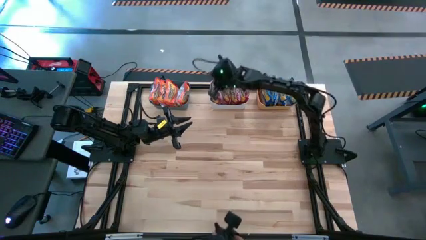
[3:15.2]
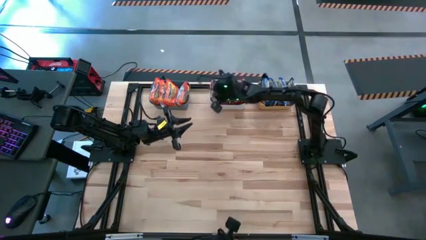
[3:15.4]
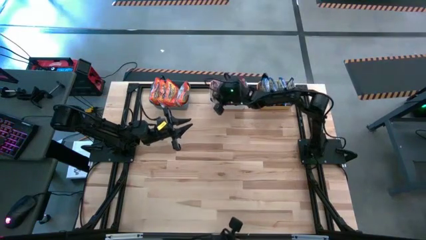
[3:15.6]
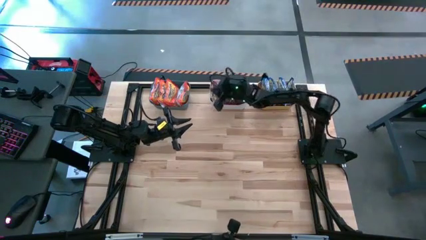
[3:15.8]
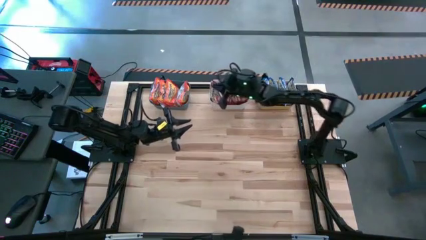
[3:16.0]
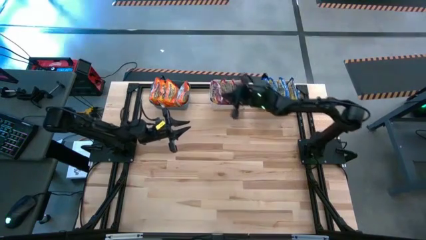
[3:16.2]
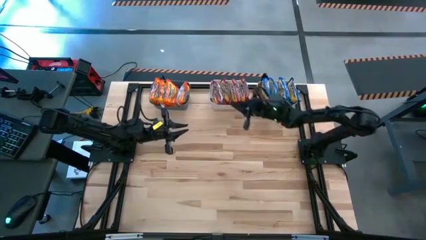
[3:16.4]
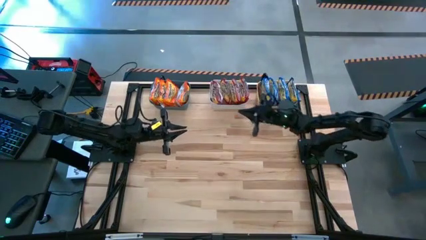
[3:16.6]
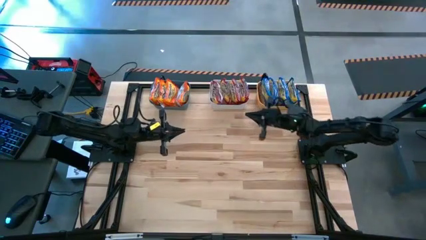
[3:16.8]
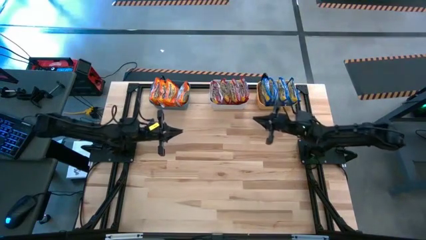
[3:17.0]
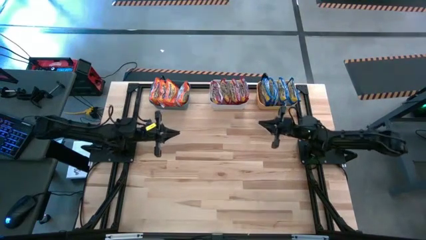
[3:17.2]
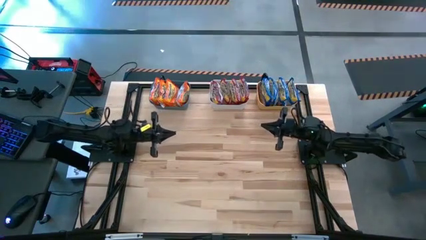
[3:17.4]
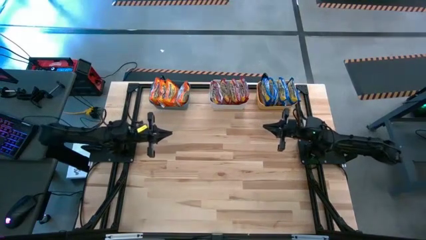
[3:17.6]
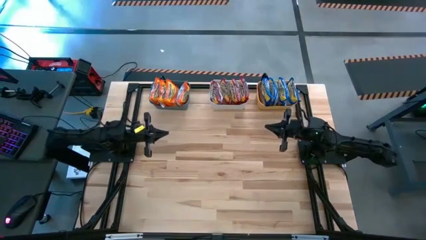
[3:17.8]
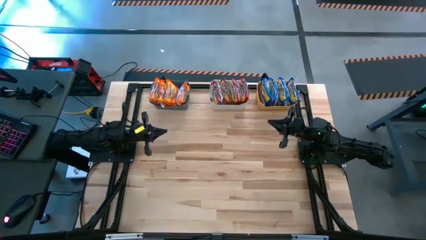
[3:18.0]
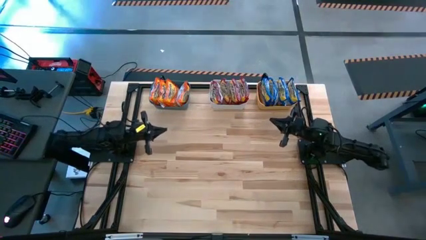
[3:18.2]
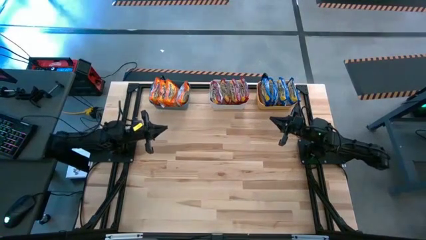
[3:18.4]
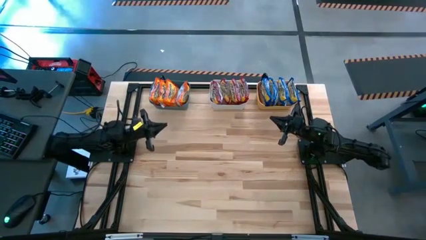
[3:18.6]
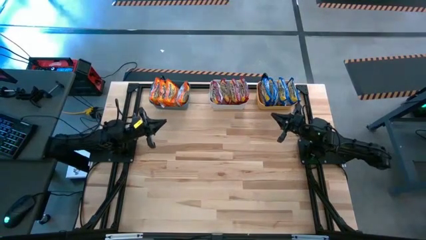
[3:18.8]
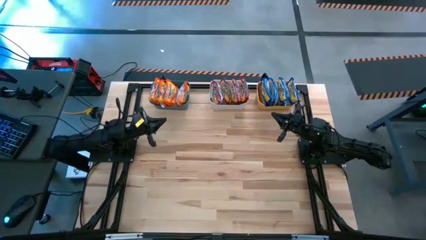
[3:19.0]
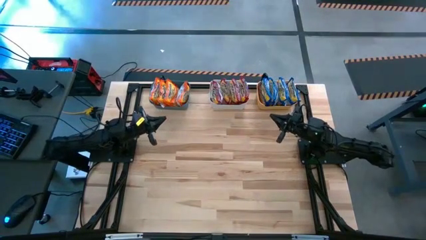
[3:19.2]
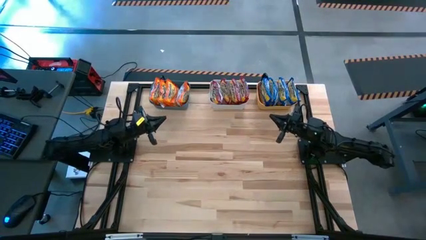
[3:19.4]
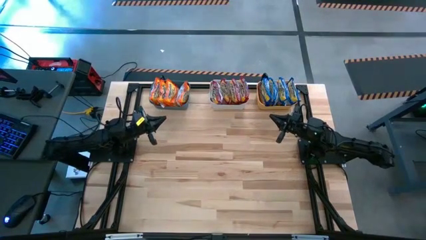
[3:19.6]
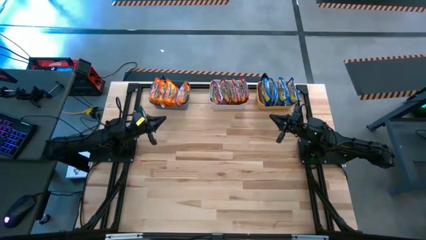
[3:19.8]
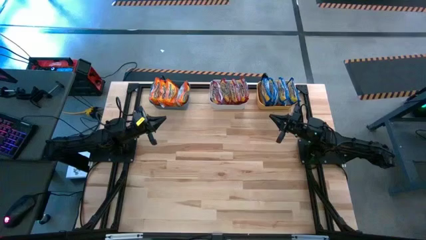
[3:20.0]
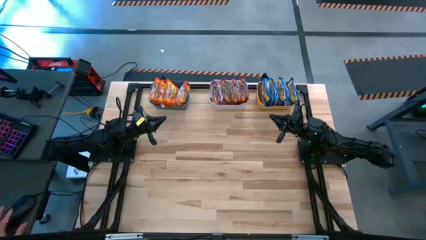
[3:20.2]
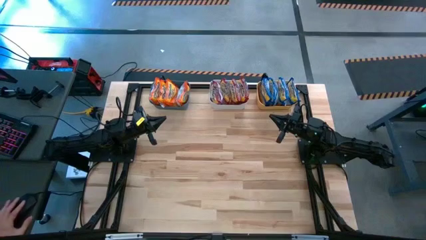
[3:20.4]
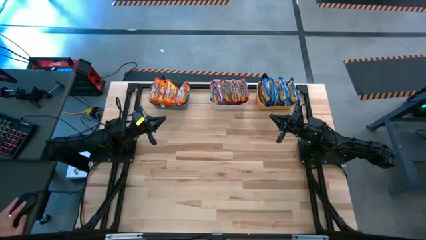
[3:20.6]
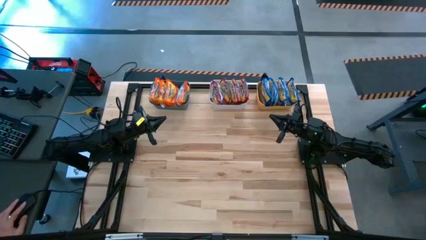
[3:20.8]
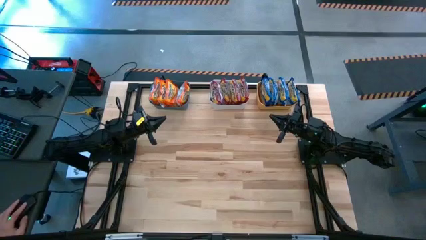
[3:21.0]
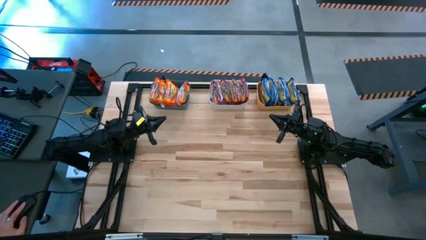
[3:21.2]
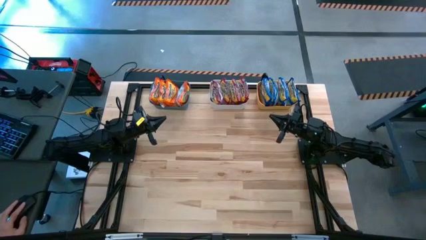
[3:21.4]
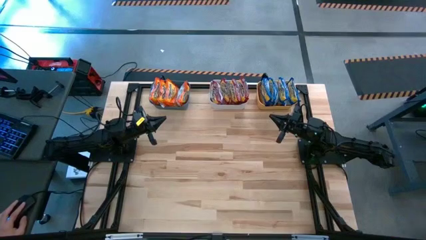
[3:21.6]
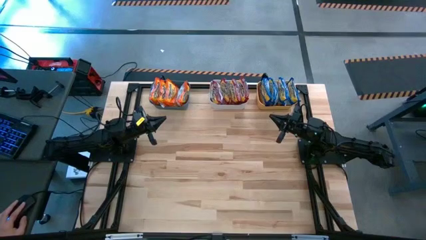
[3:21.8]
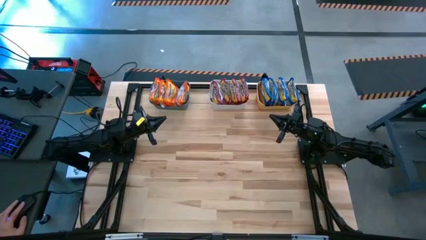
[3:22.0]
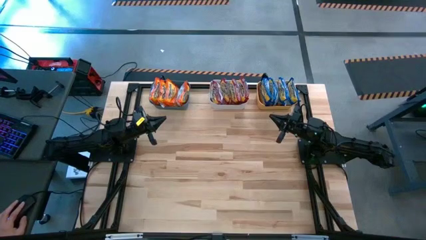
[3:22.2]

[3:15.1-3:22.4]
Task: Sort Maruchan noodles
Return to Home Position

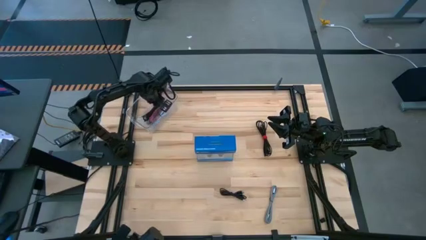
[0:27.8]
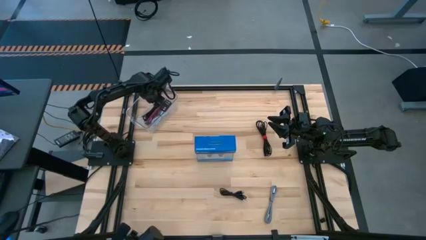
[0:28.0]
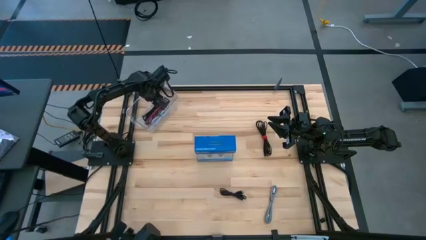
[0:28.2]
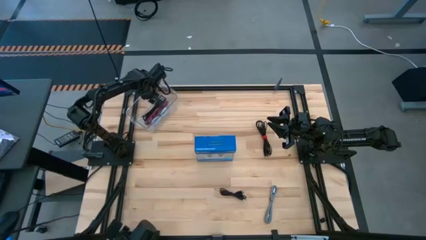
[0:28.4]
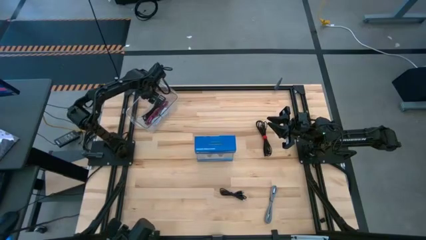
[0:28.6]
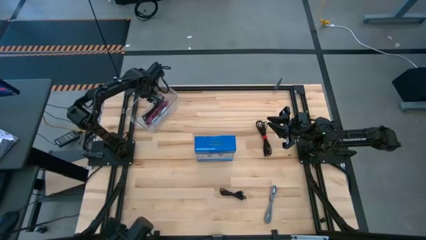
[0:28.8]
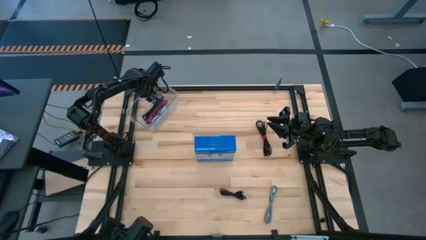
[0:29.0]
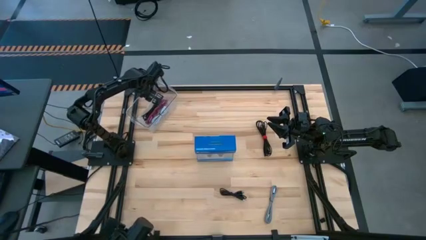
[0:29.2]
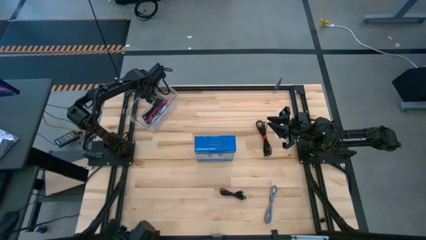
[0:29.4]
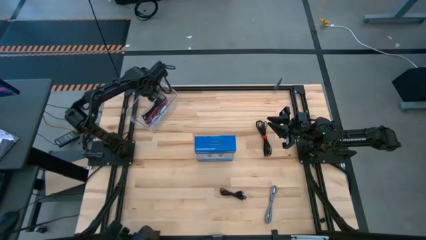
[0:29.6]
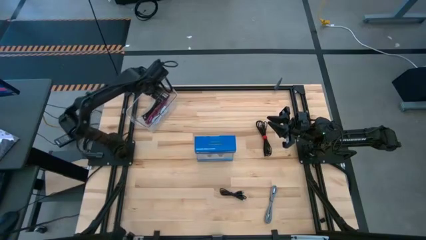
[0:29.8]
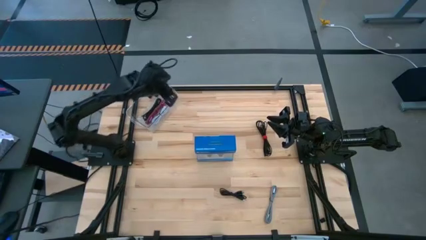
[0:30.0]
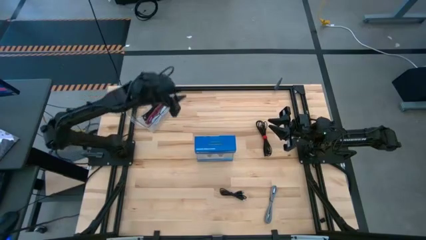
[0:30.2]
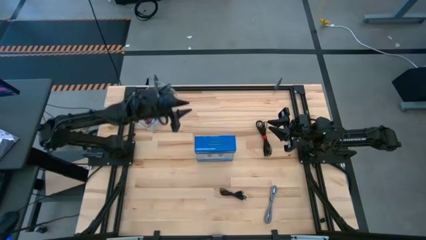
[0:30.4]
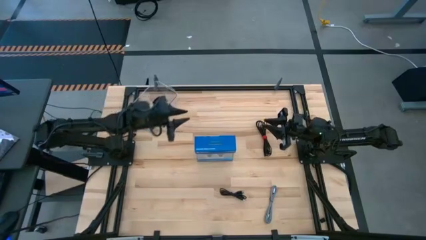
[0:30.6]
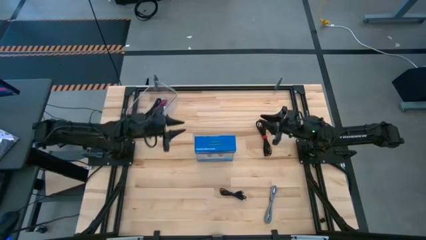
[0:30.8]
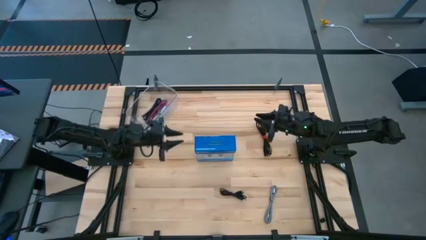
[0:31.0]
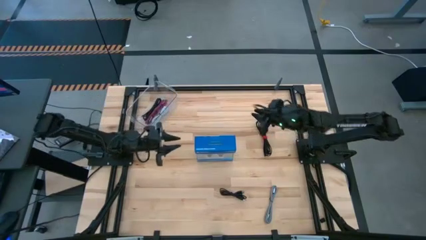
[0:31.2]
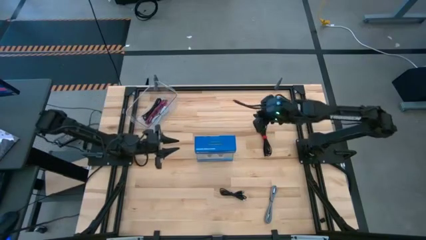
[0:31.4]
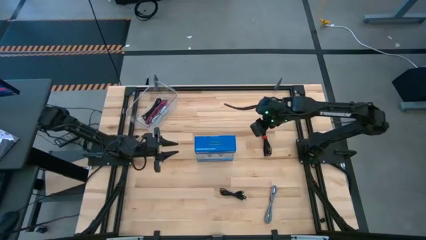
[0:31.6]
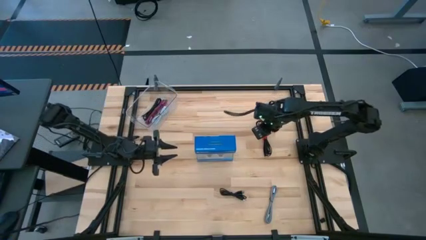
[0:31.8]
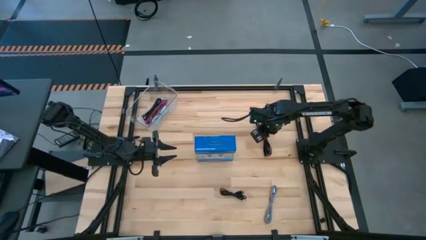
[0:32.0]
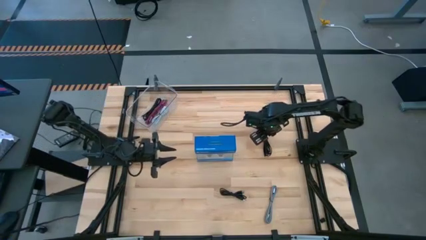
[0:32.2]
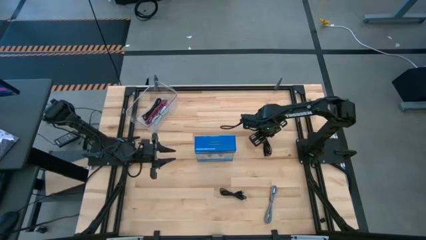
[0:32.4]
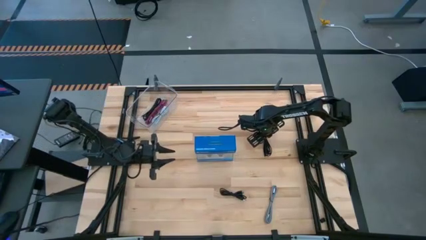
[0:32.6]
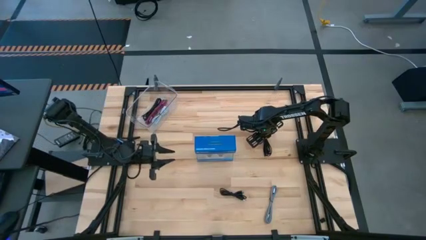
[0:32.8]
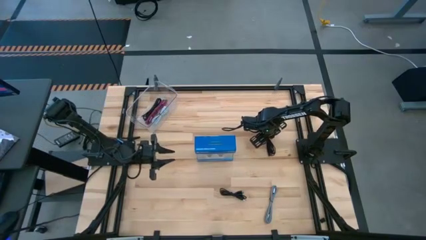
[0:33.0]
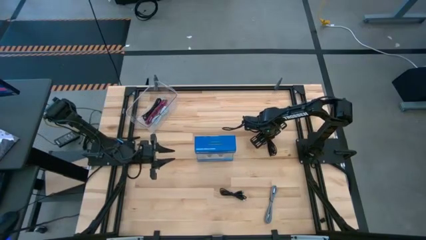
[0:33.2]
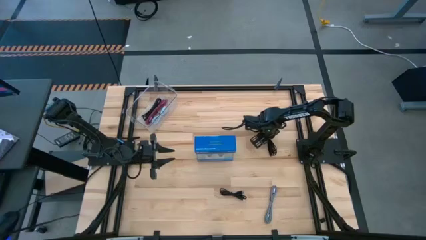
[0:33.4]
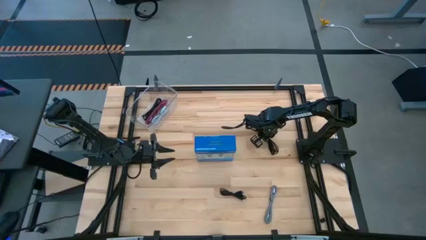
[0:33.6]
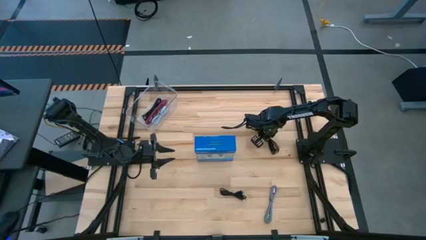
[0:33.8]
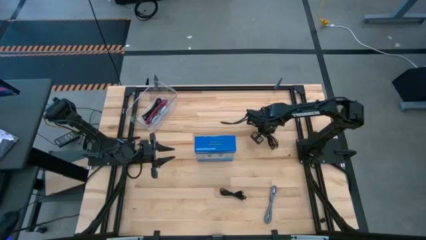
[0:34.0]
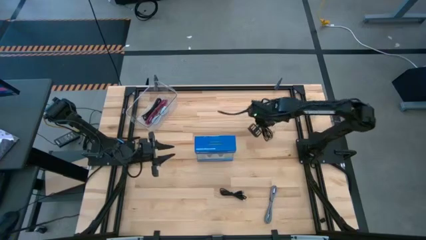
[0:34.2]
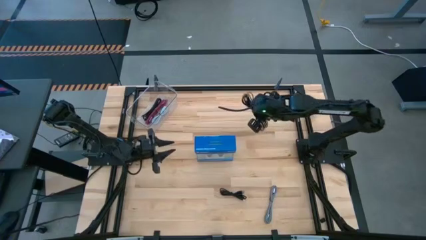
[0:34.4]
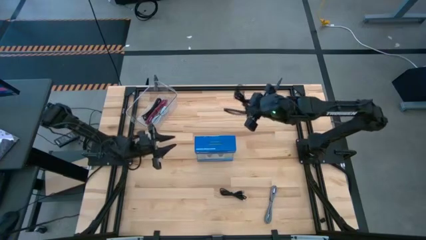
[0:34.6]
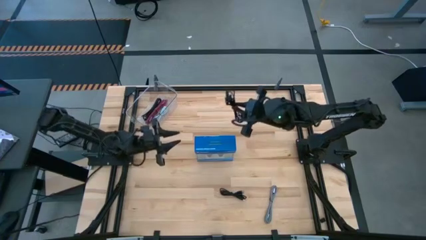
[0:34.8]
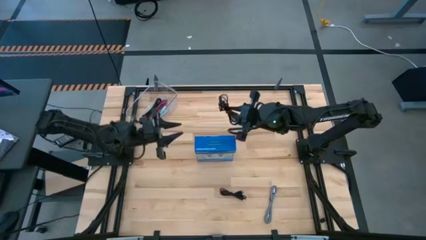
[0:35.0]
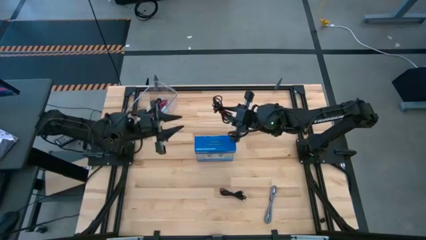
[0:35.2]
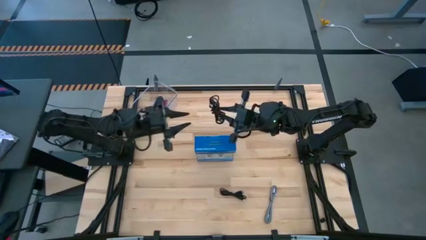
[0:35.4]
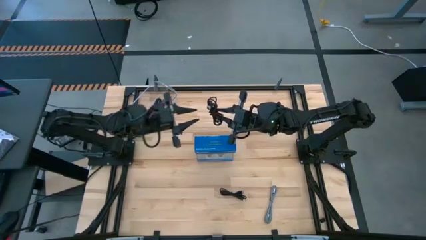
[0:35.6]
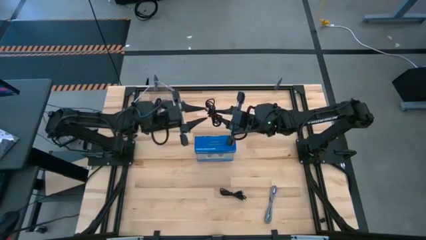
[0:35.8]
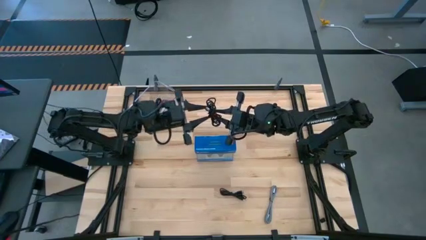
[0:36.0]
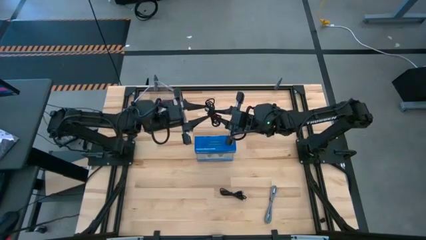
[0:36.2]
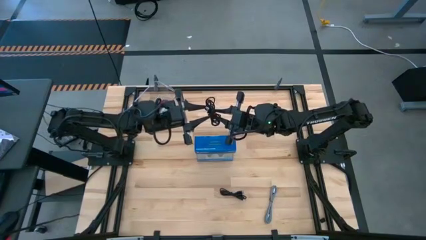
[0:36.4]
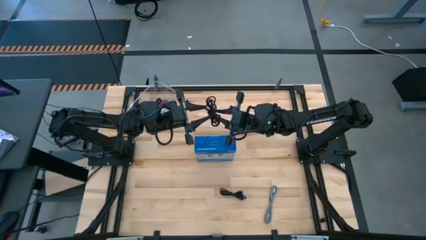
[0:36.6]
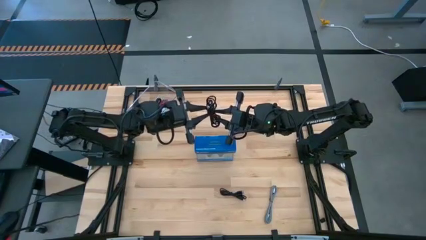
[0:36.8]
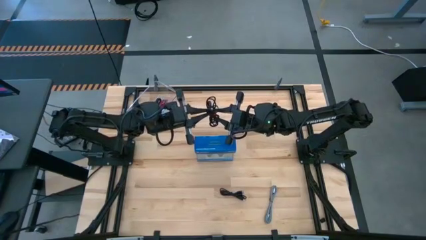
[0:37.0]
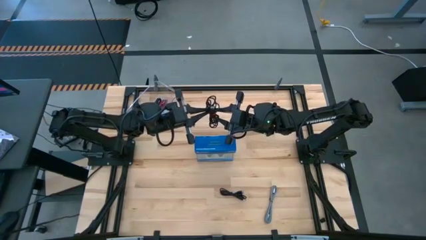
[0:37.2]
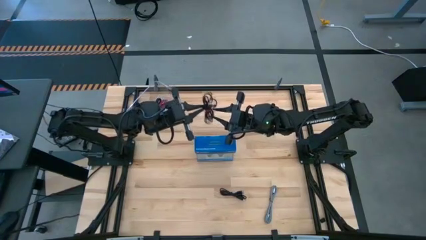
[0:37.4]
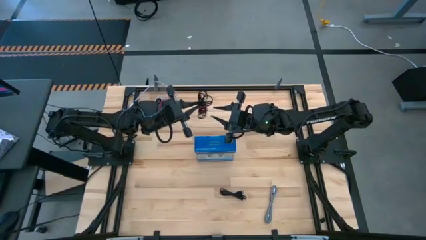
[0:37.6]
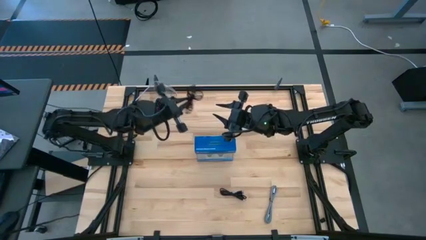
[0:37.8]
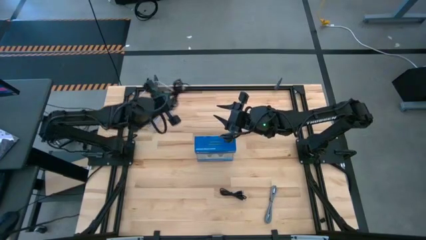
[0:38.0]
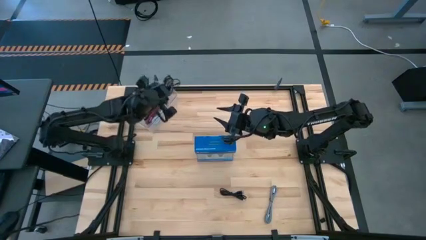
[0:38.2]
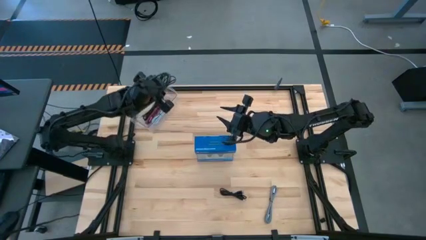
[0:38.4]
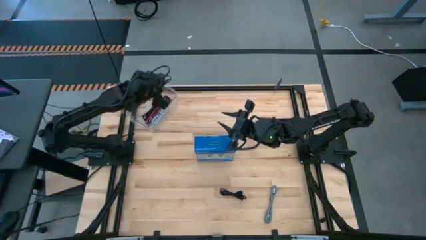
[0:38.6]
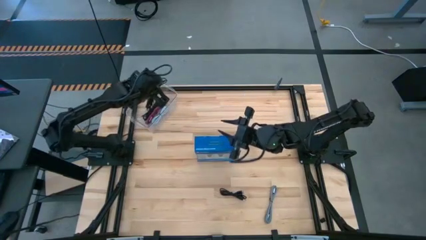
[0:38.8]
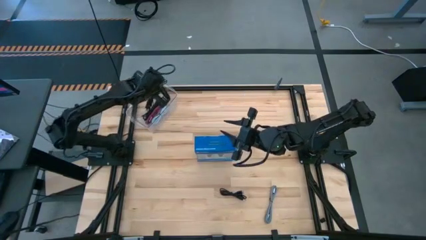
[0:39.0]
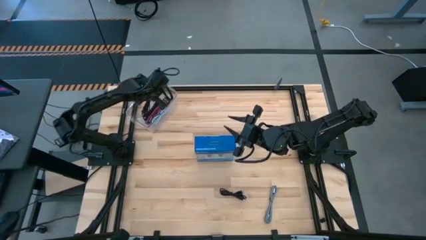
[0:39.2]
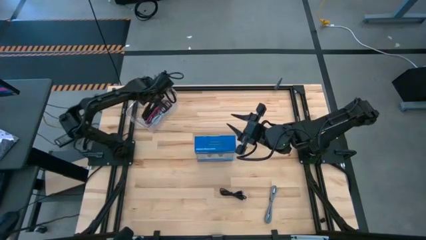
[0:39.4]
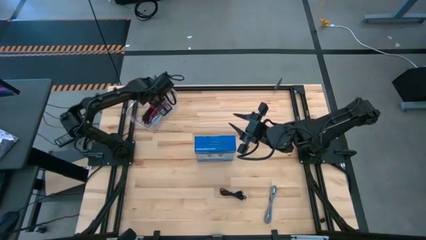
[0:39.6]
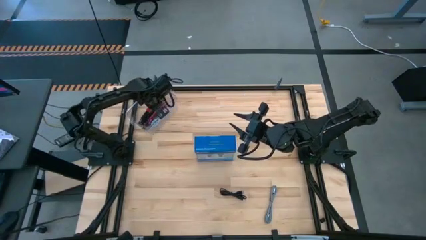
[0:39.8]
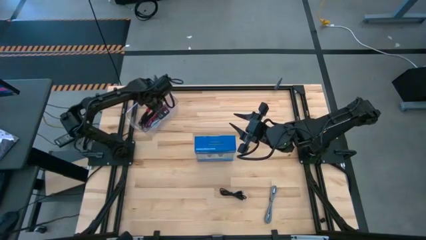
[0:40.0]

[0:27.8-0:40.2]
Task: Pick and place USB-C Cables
Put the top black charger cable into the transparent bin
